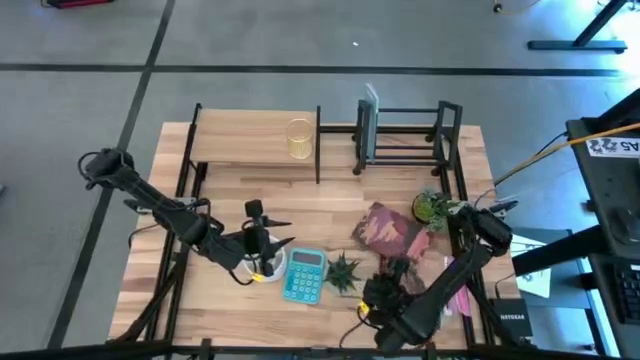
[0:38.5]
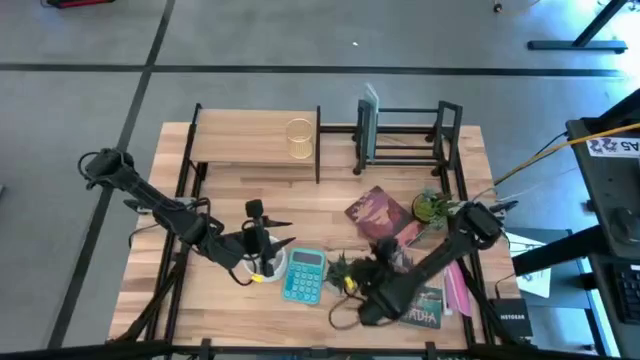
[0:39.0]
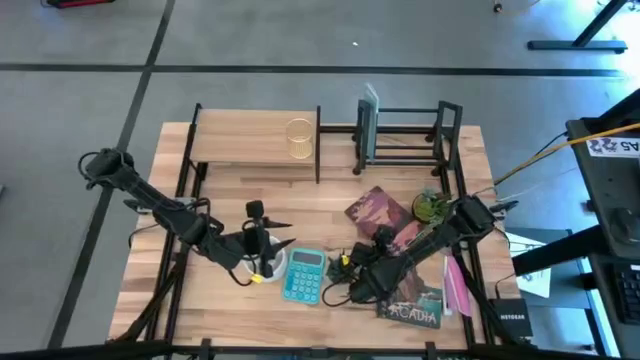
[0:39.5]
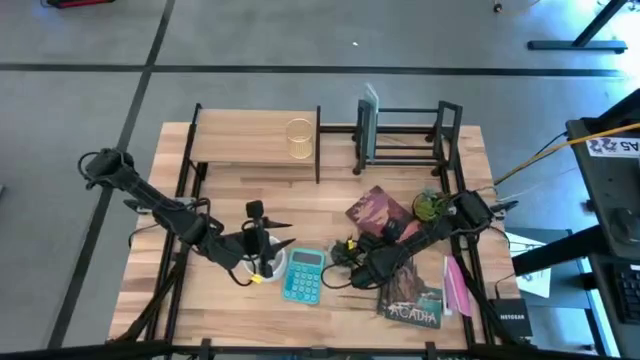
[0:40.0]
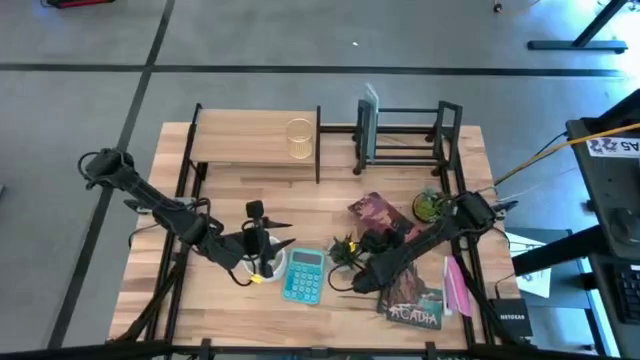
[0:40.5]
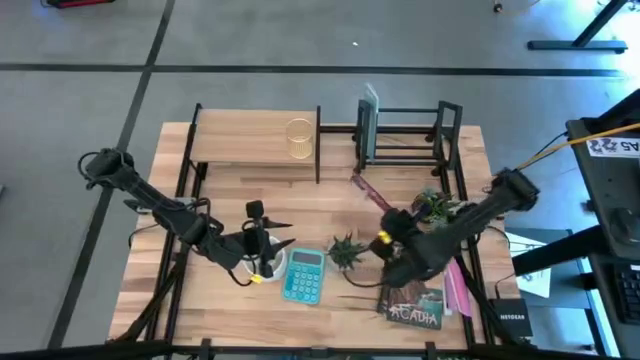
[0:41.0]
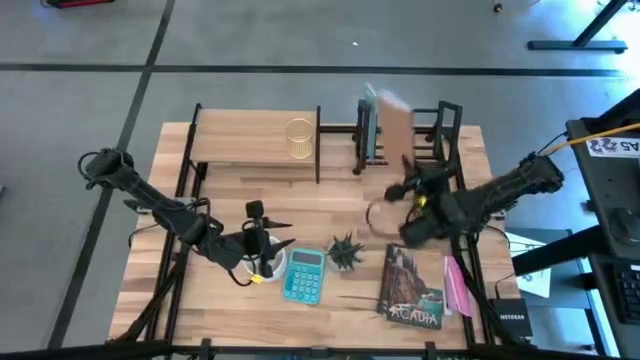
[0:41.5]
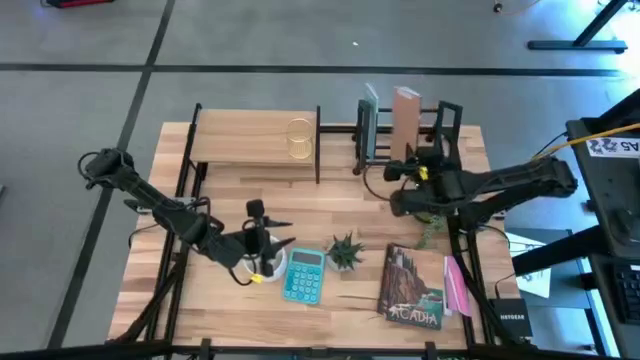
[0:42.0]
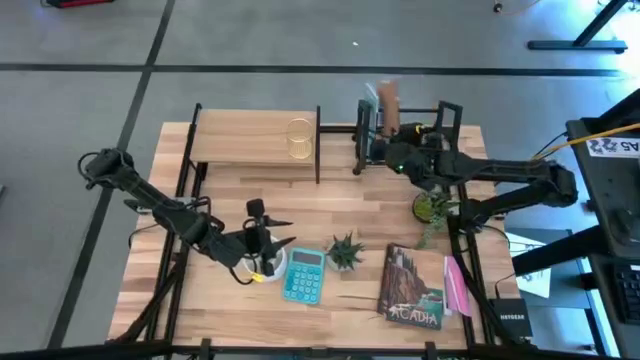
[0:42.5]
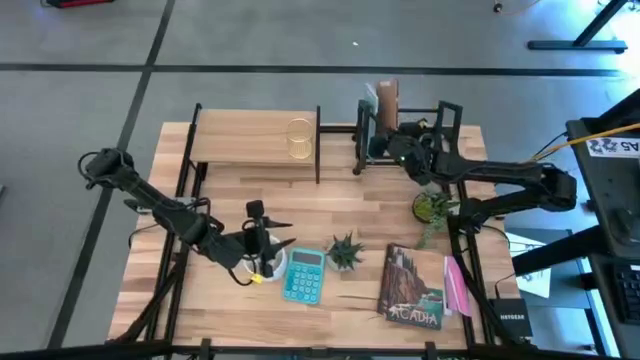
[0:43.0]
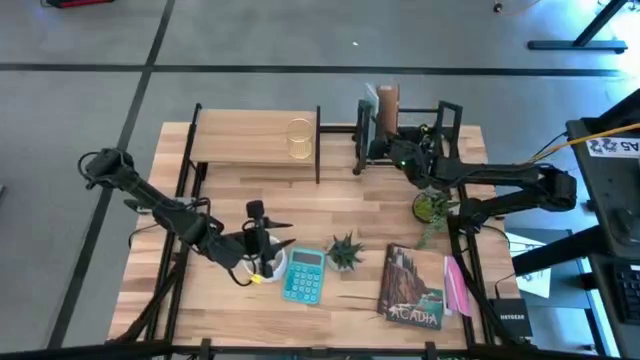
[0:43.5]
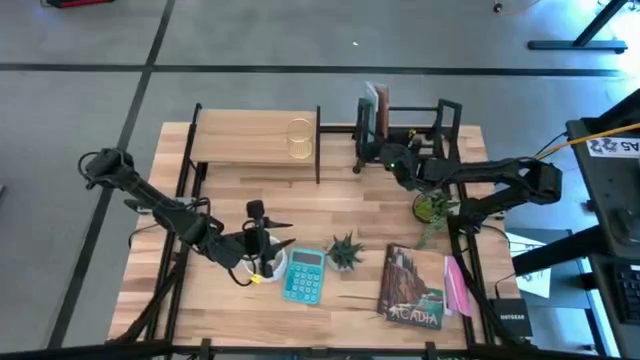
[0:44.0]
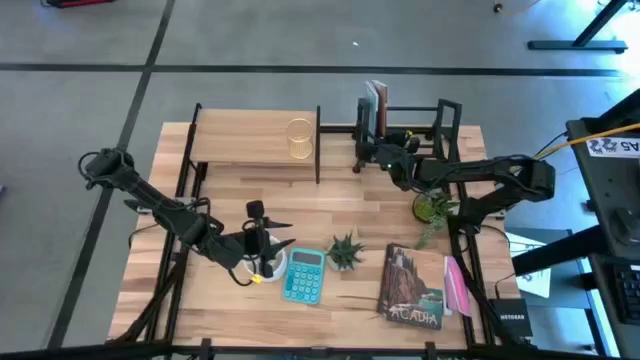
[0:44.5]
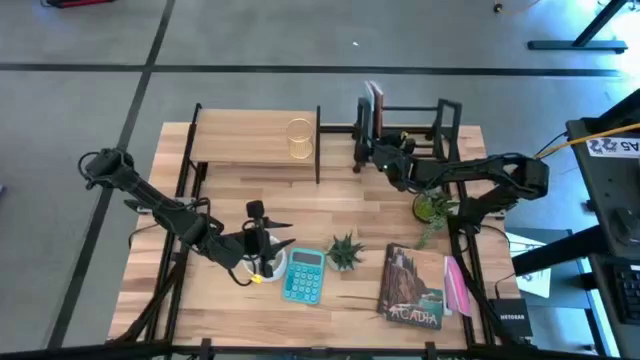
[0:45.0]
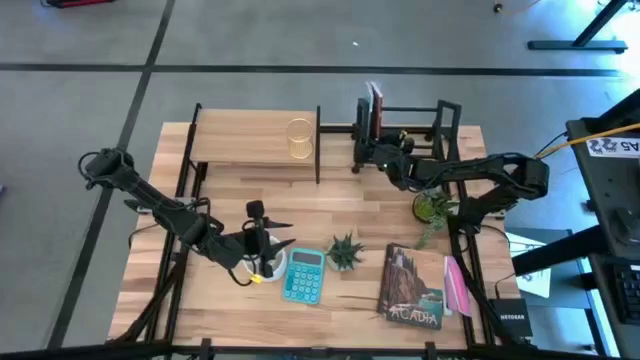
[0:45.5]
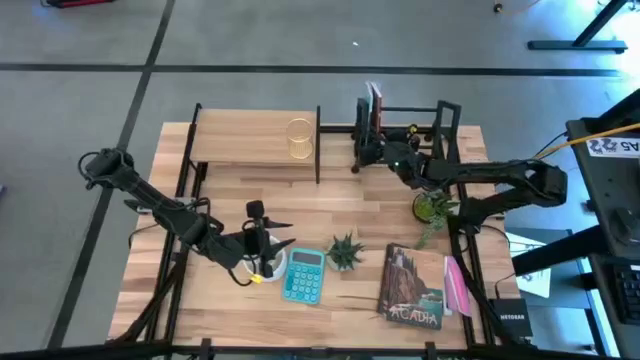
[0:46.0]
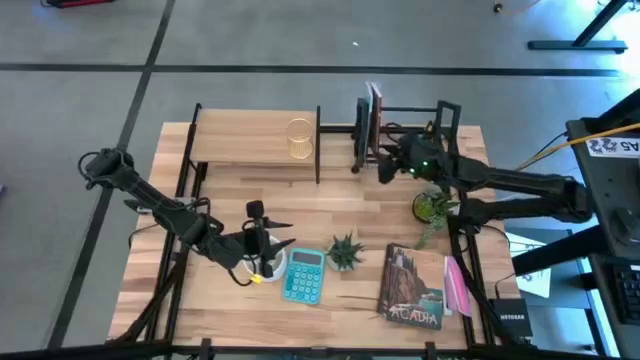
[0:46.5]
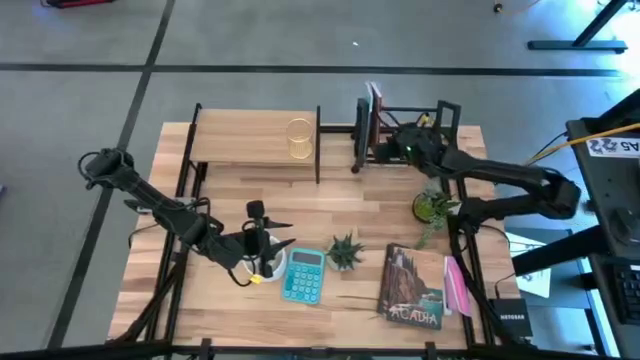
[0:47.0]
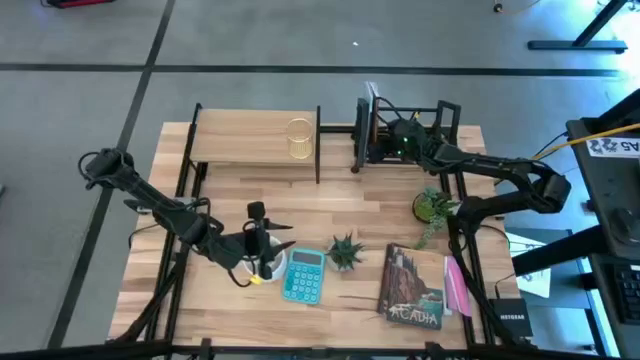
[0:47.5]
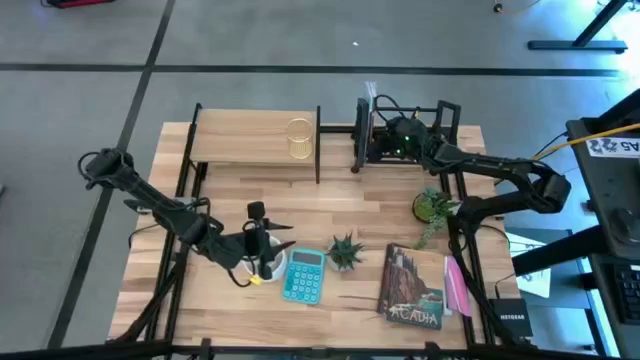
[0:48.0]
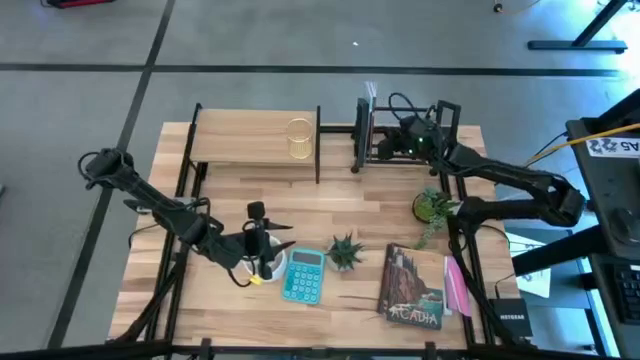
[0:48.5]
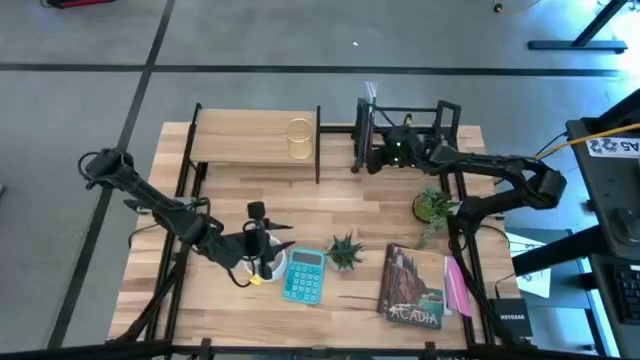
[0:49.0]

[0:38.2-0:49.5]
Task: Stock shelves
Put the purple book on the book shelf

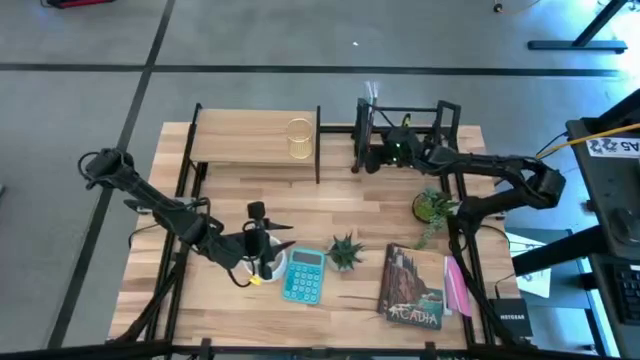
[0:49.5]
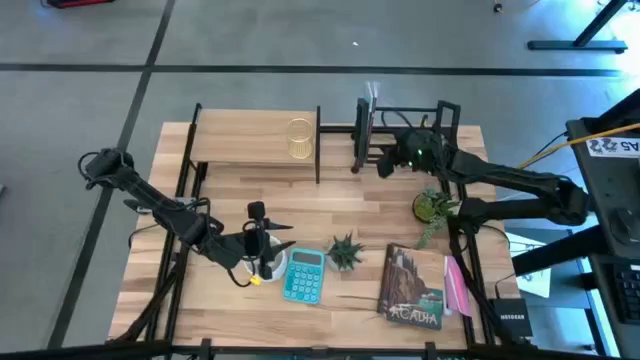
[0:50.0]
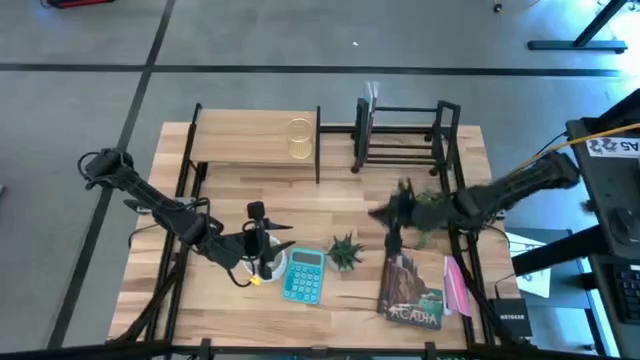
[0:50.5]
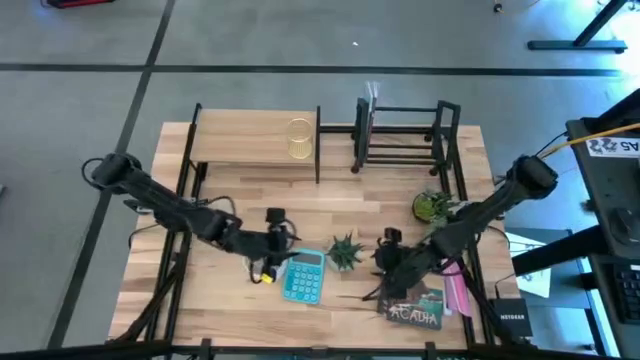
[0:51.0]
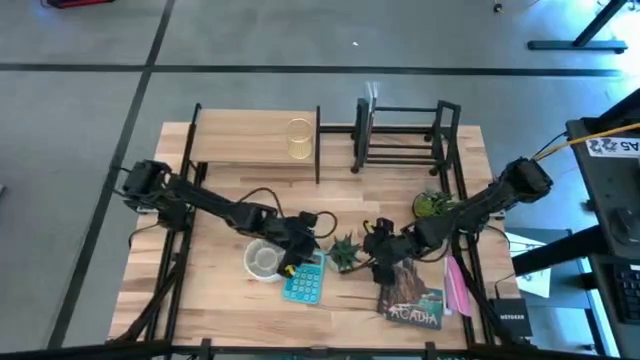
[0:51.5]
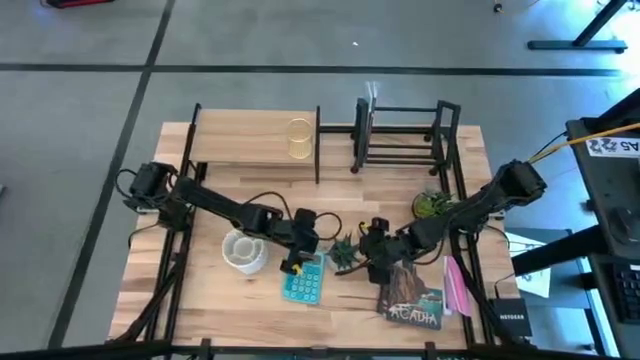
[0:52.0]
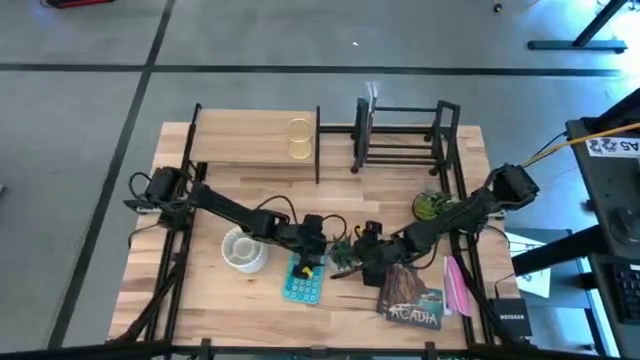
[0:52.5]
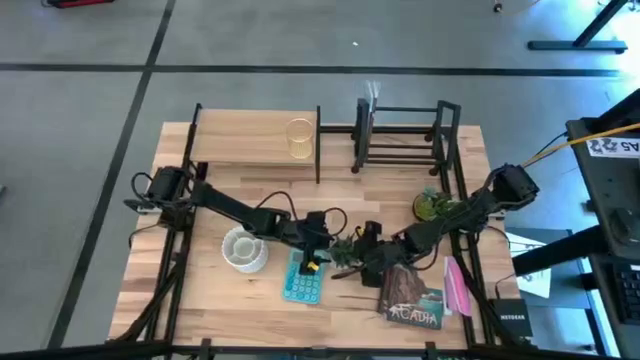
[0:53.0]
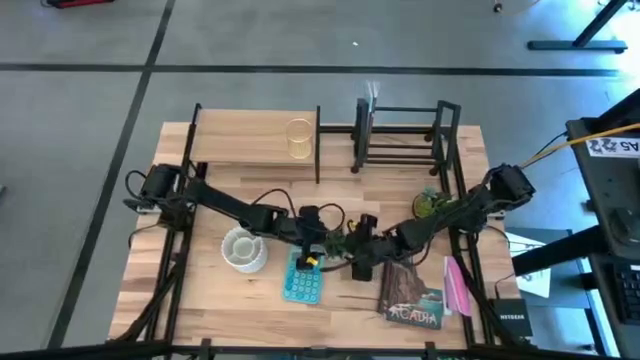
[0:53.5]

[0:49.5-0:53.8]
Put the gray plant vase under the shelf

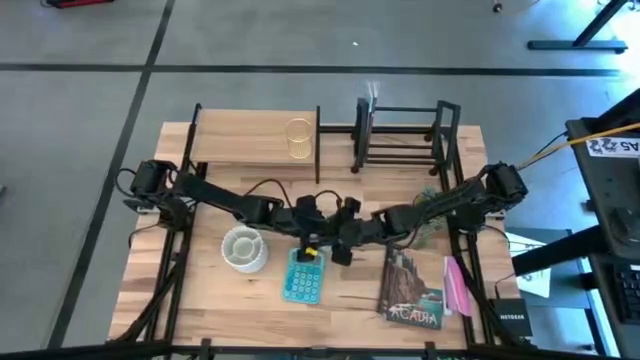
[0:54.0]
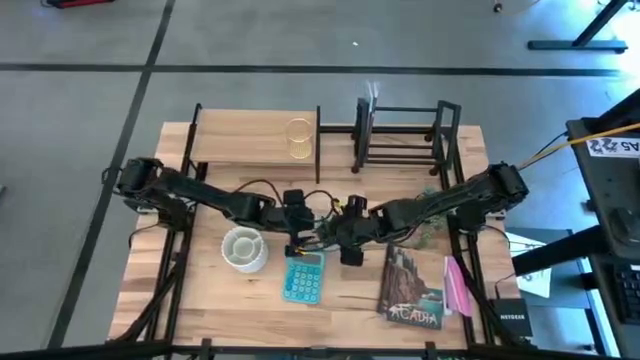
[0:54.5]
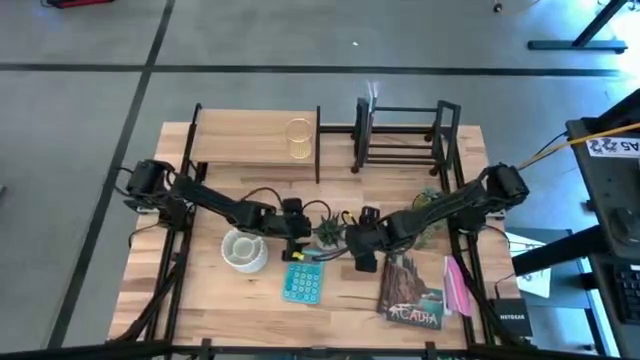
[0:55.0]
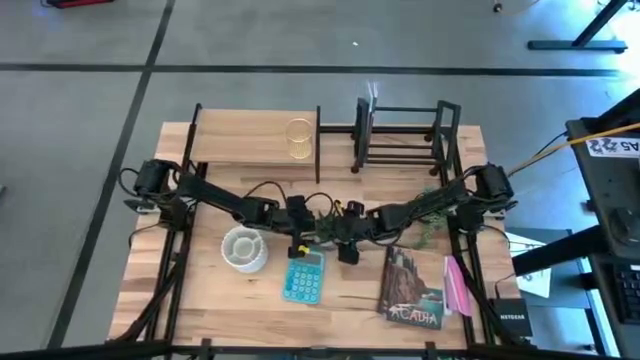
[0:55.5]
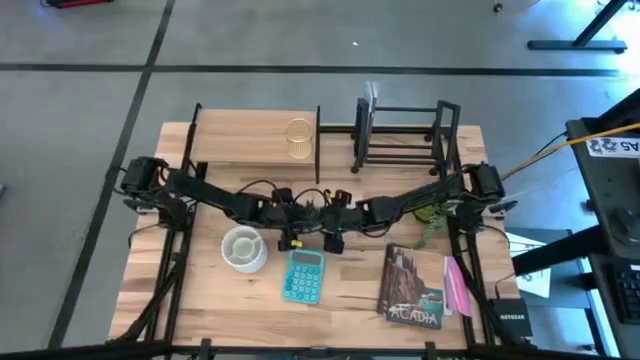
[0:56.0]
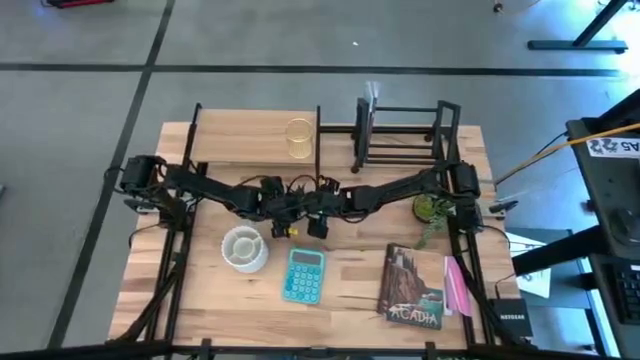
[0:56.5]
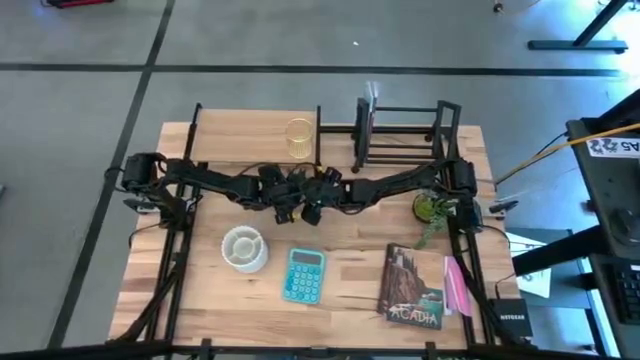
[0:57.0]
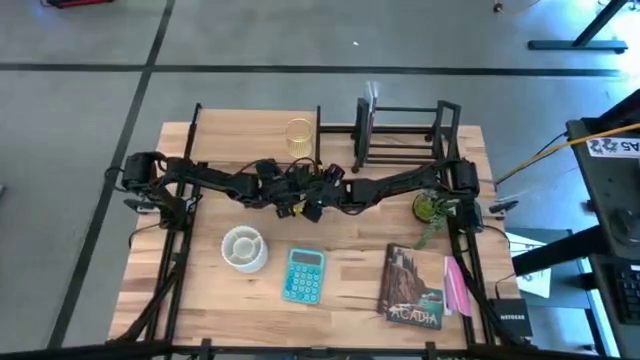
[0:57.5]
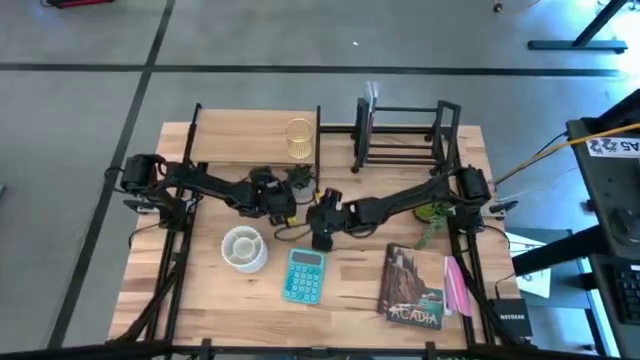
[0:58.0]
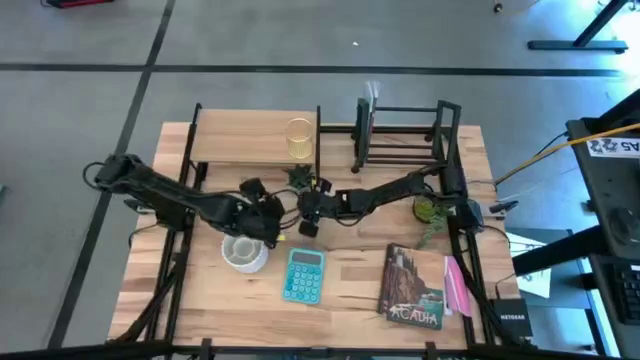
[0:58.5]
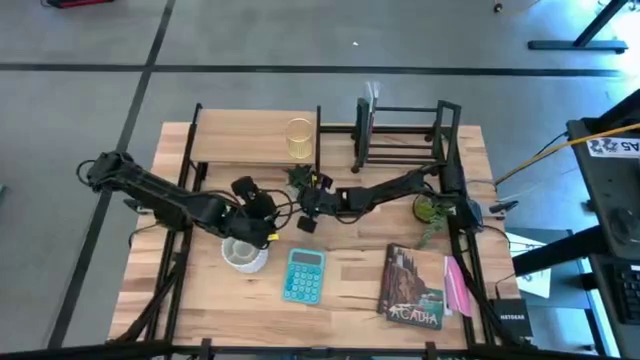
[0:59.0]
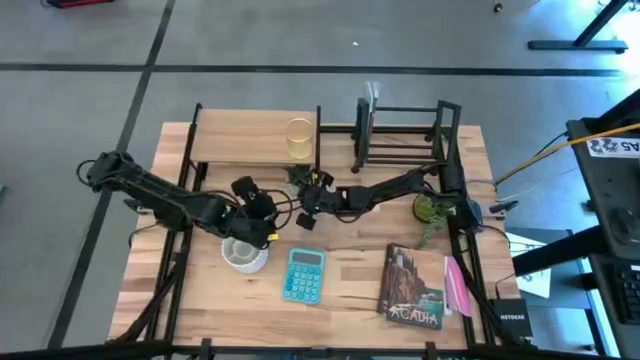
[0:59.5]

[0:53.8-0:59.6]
Put the gray plant vase under the shelf
